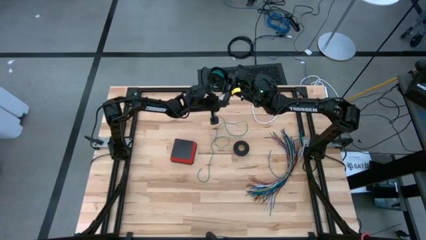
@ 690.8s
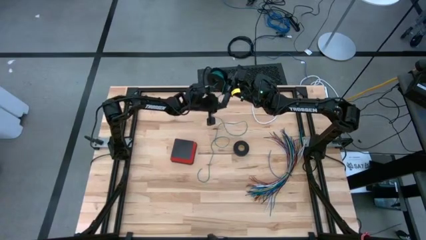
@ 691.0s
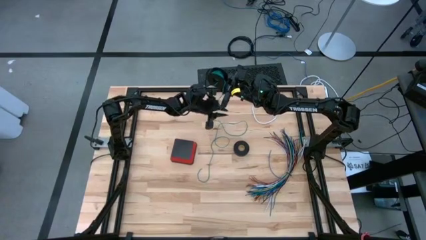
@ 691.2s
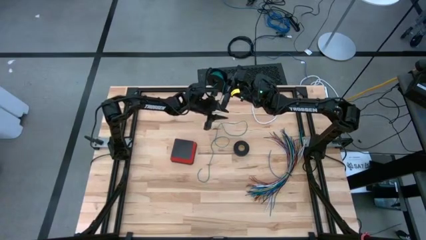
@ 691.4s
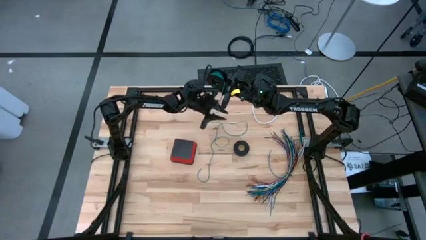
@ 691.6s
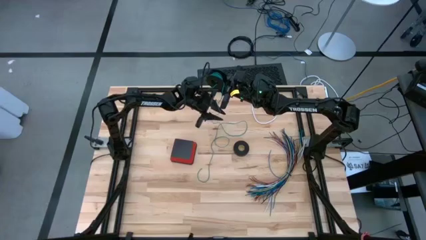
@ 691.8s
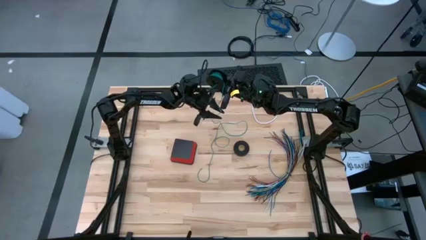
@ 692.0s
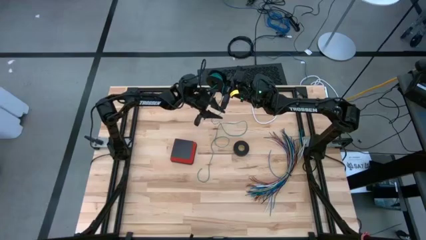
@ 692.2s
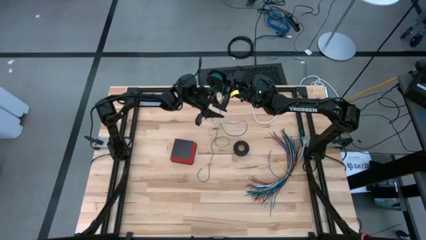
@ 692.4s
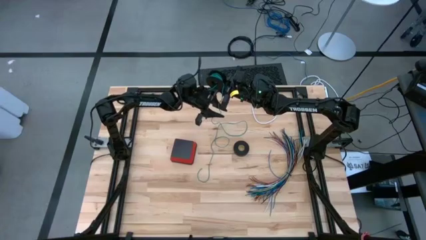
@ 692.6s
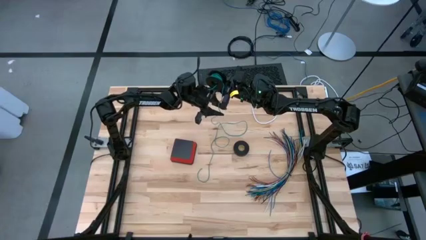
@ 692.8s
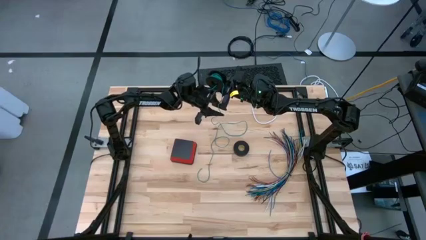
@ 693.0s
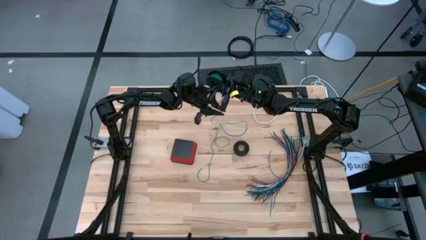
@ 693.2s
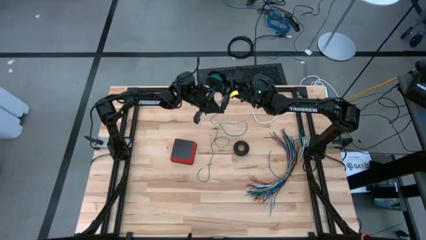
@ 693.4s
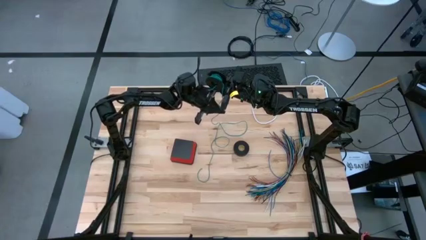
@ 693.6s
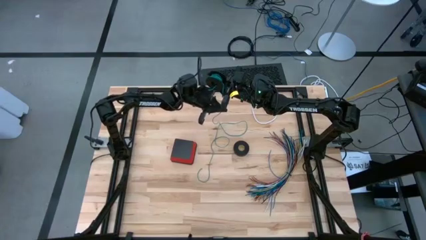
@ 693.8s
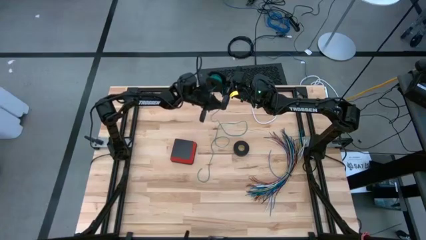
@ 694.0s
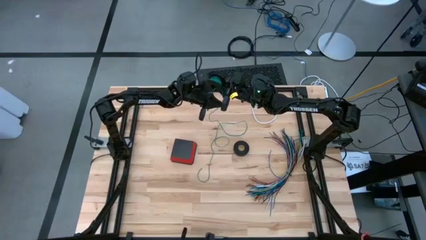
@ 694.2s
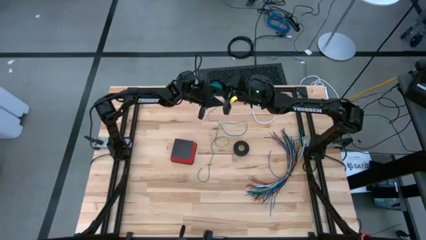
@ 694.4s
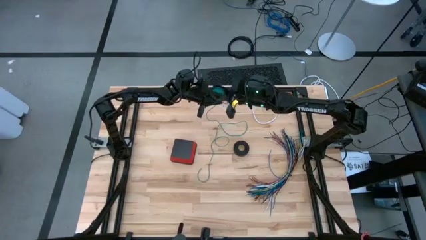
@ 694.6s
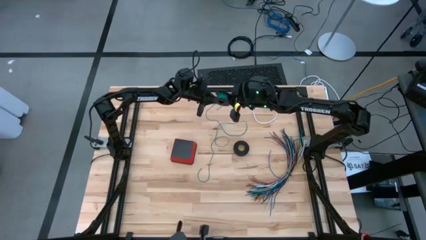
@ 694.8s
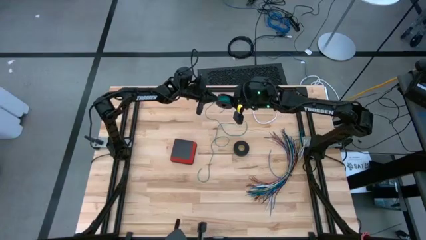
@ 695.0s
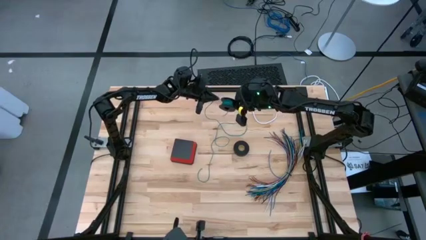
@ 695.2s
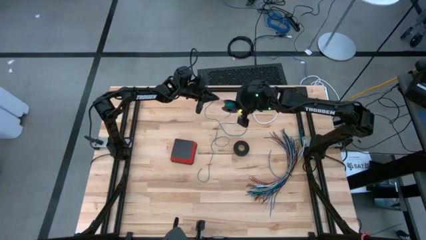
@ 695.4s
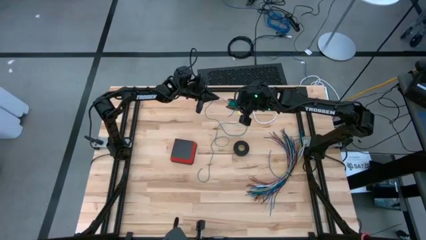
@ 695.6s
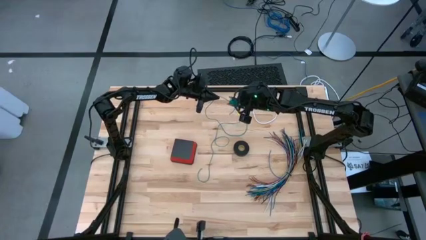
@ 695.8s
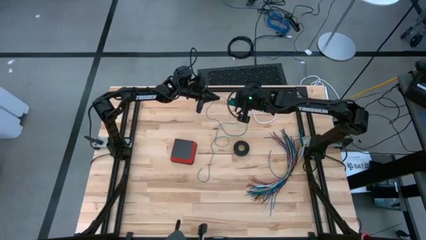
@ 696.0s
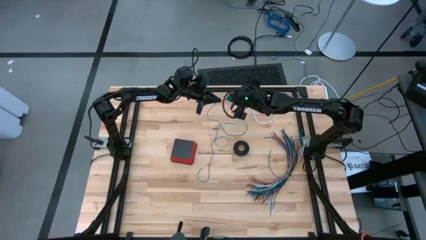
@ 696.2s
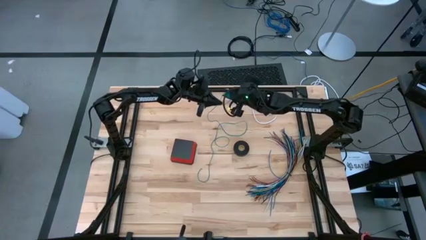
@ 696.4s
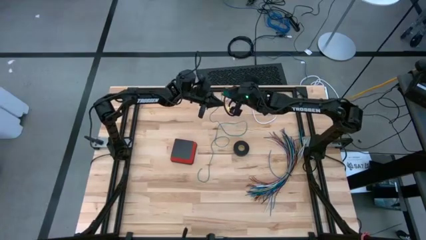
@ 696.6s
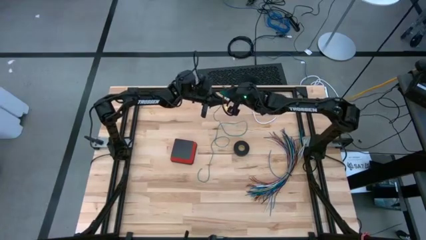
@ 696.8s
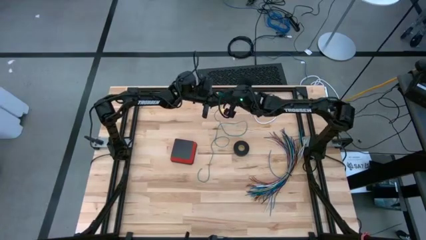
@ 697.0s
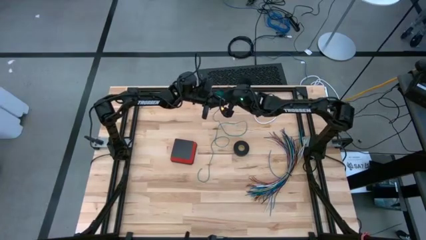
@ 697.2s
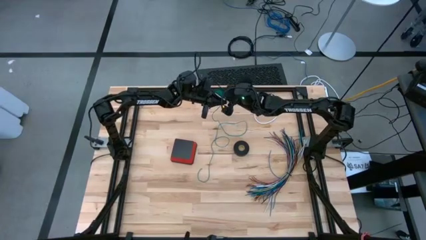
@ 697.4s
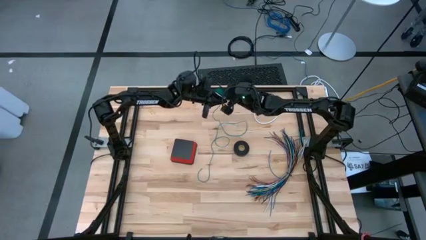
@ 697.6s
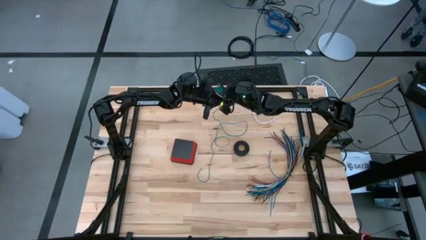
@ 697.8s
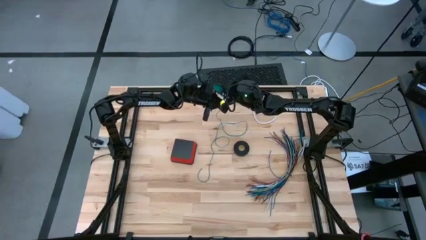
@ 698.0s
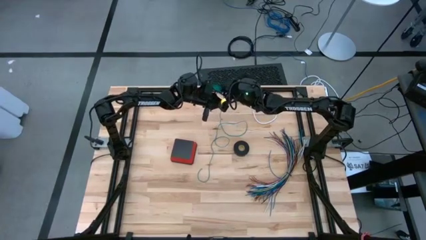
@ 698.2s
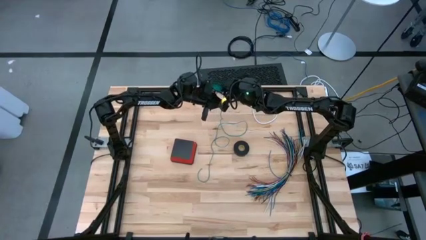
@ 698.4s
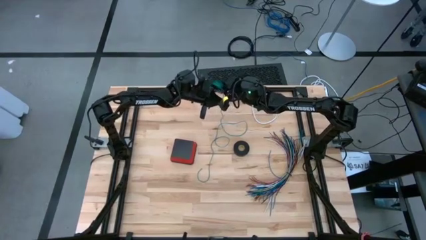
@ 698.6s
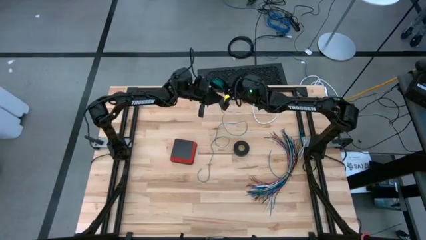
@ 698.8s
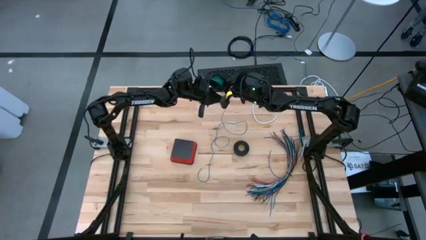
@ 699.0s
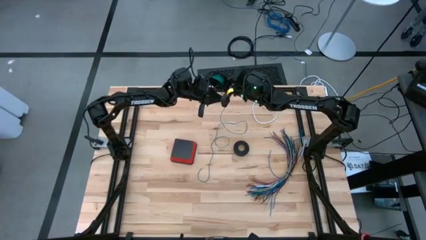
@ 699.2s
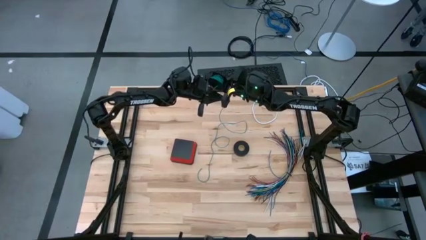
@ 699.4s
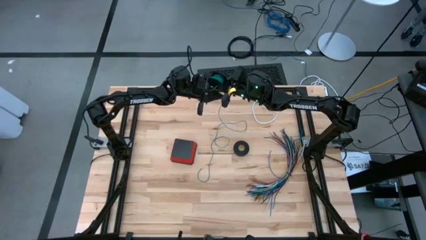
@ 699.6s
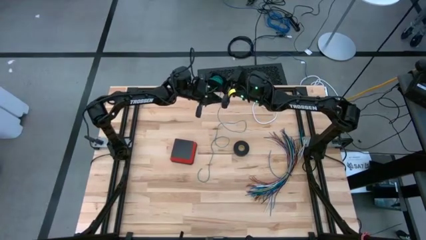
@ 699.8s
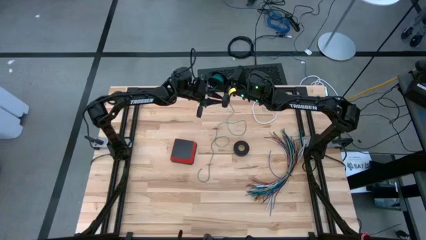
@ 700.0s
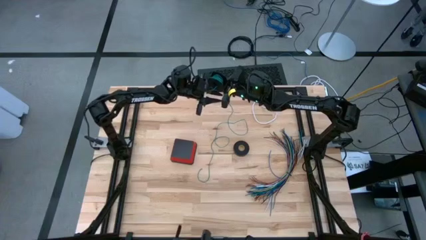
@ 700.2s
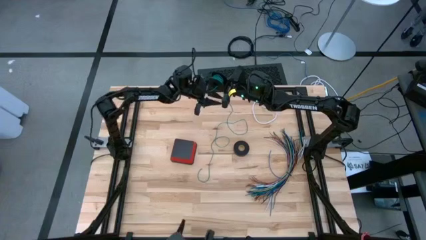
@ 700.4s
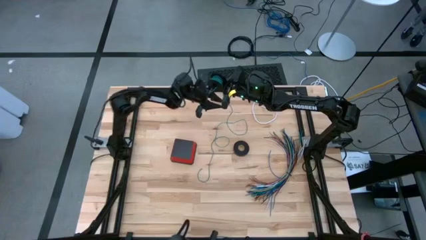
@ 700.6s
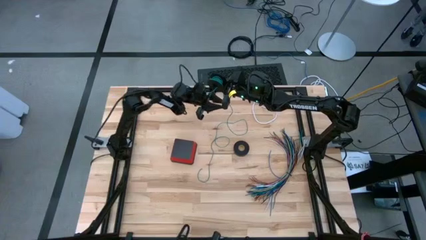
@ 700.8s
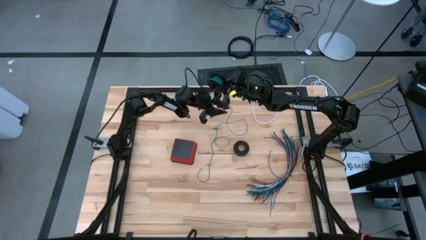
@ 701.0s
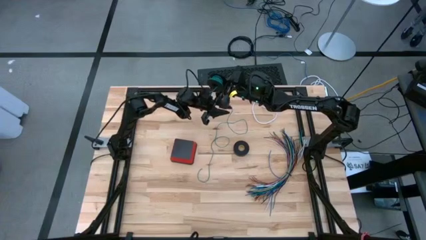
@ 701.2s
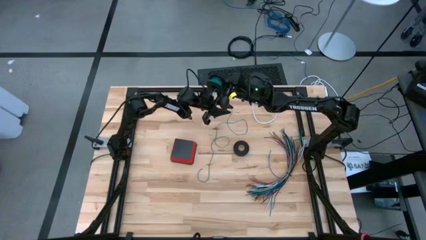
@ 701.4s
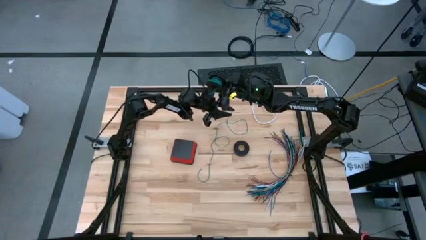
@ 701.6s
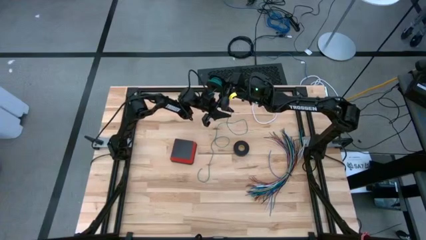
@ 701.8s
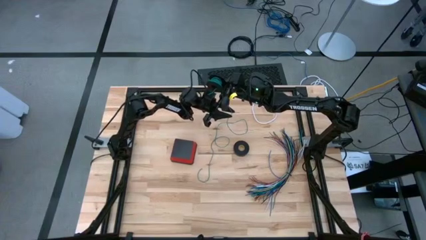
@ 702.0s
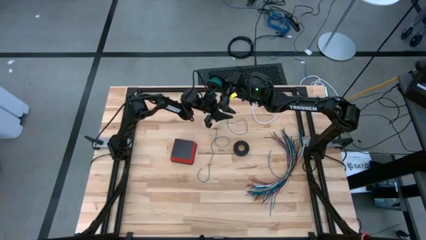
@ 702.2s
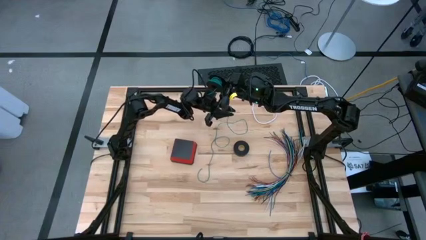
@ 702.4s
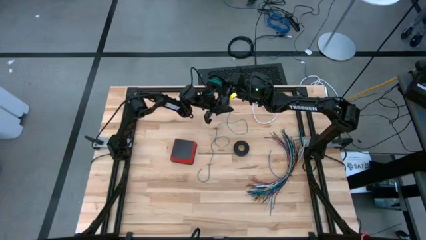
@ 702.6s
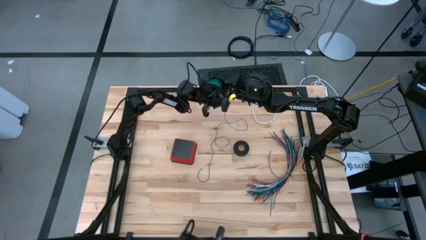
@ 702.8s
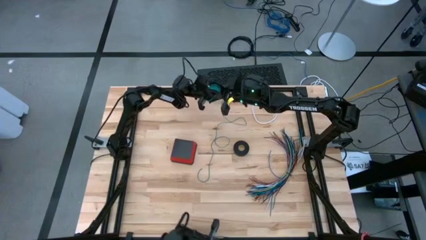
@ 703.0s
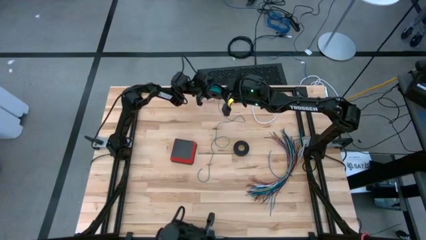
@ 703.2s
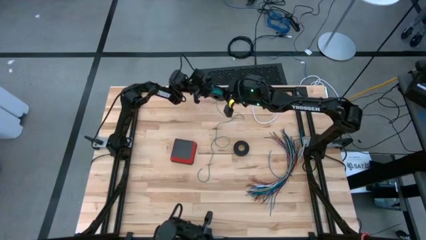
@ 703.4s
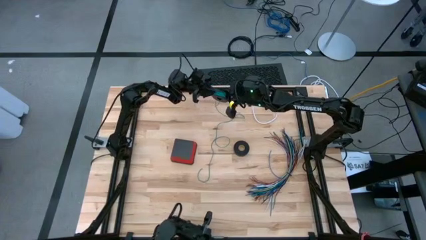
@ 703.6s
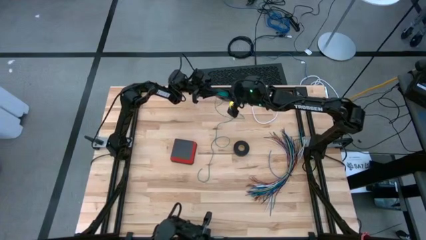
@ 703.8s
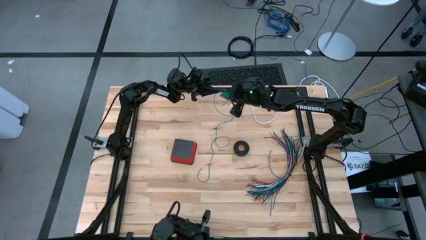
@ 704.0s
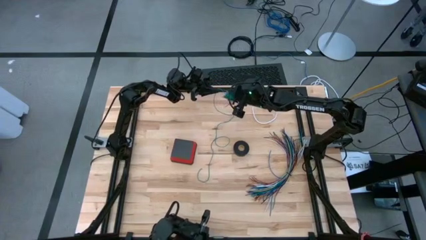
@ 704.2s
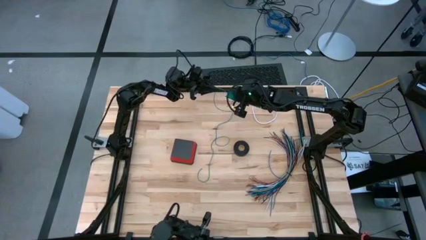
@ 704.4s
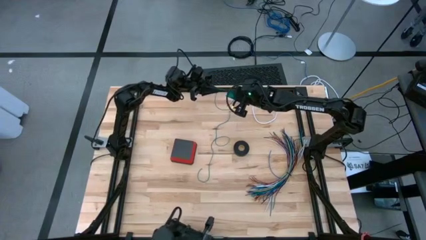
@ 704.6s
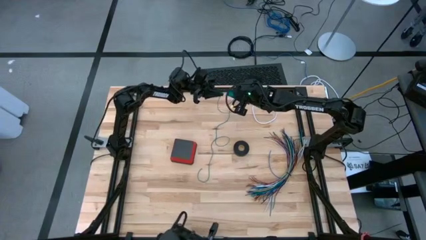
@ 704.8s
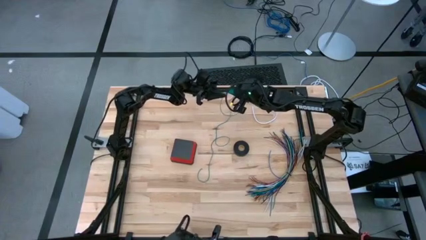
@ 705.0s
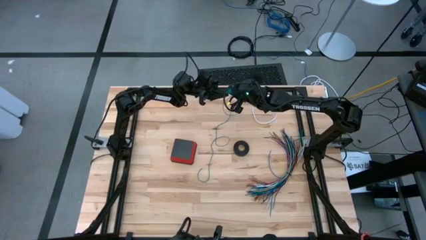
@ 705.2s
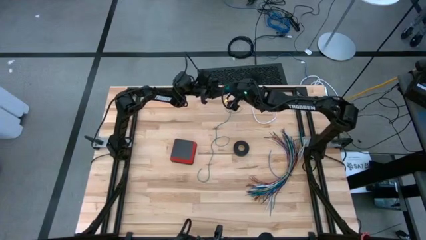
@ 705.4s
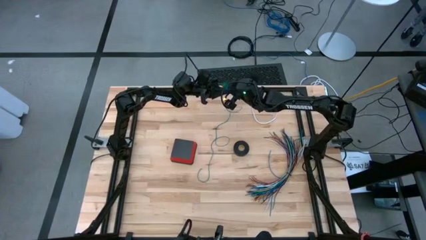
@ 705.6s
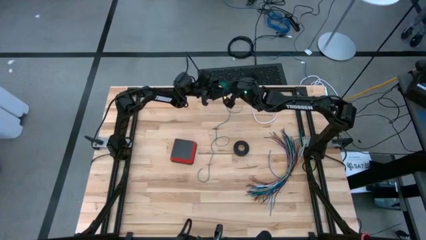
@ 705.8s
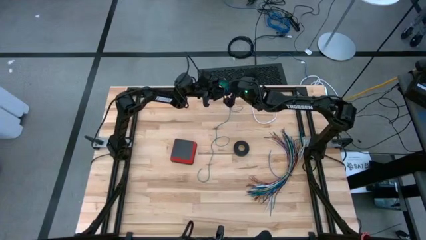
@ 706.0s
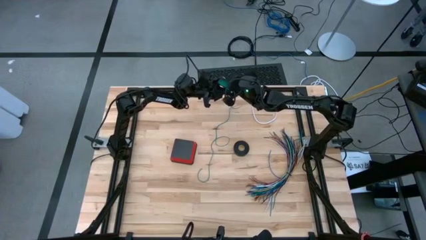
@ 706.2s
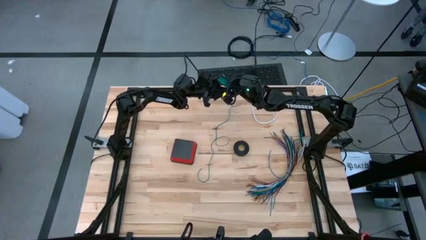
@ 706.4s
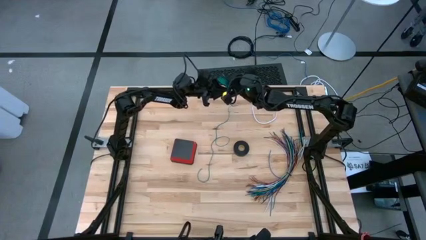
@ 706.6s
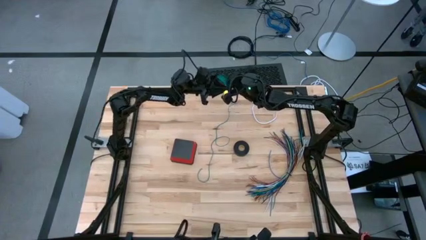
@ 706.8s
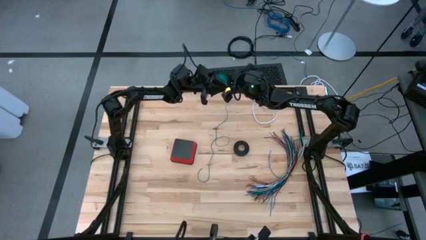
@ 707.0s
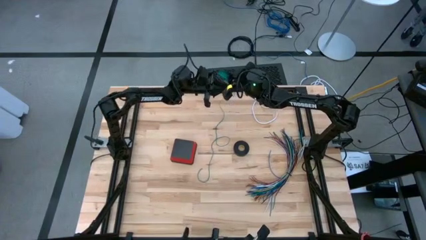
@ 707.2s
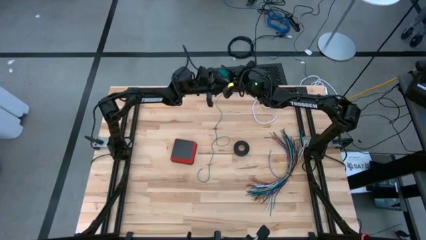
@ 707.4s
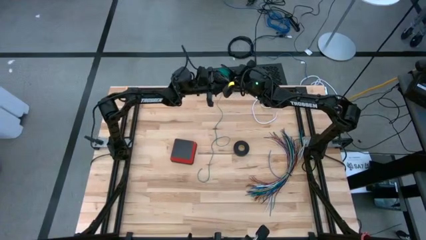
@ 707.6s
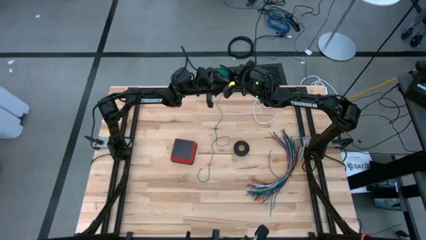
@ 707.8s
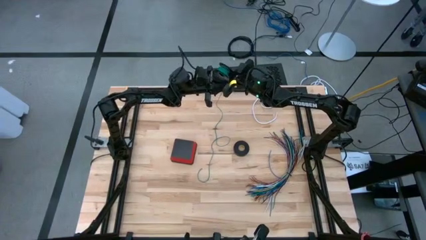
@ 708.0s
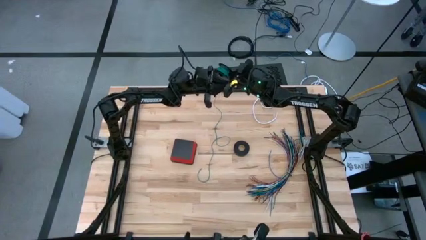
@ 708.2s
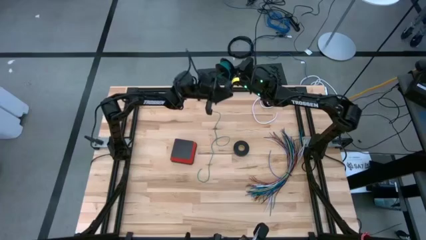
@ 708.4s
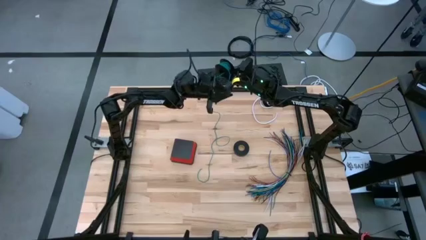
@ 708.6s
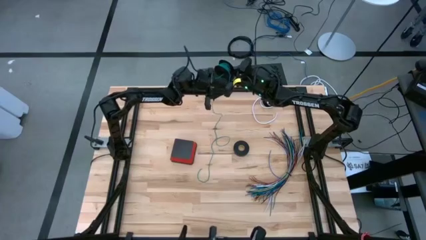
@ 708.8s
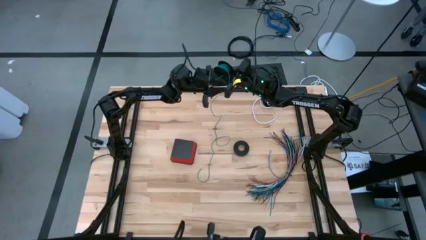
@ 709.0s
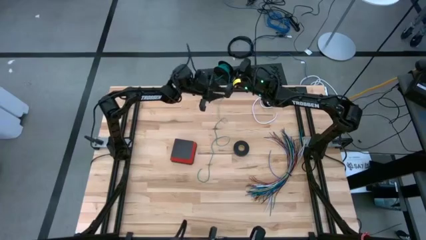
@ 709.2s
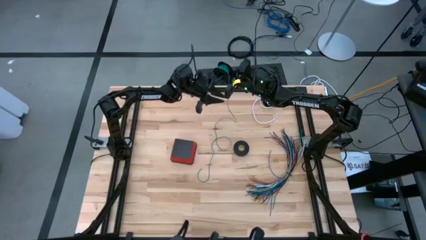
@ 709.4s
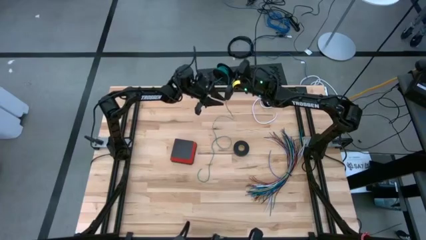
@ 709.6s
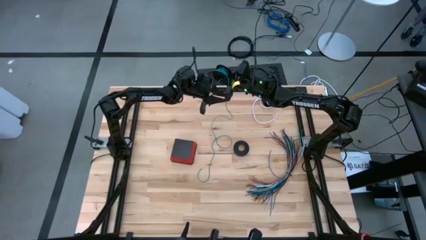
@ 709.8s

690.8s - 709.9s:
Task: Coiling cords
Coil the green wire cable on the spool
